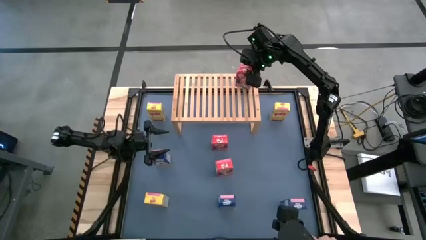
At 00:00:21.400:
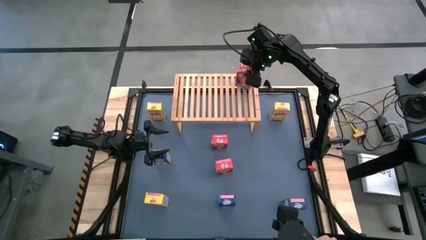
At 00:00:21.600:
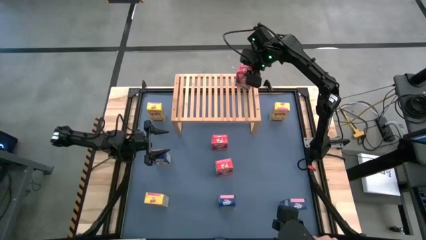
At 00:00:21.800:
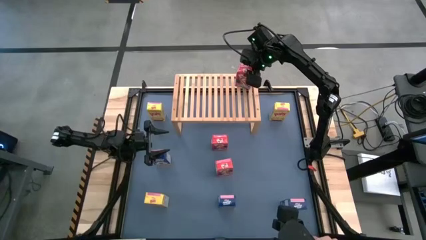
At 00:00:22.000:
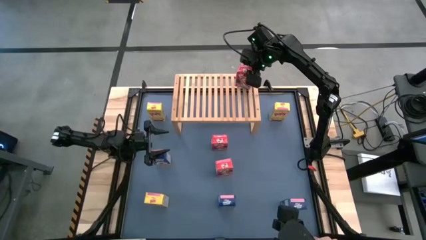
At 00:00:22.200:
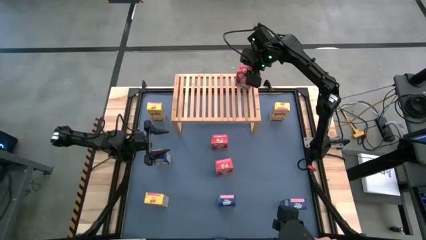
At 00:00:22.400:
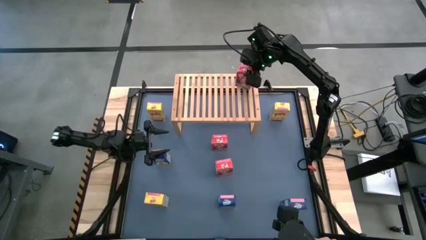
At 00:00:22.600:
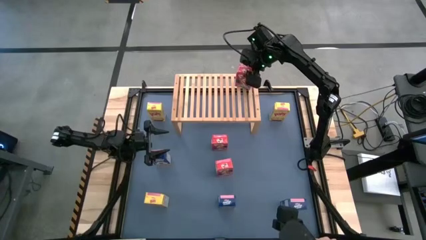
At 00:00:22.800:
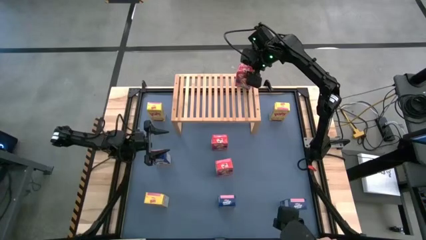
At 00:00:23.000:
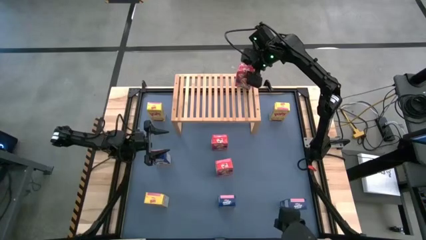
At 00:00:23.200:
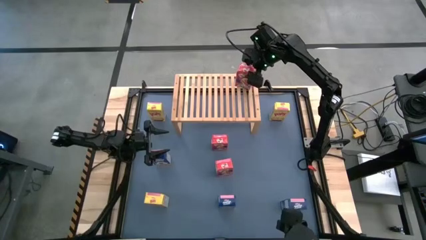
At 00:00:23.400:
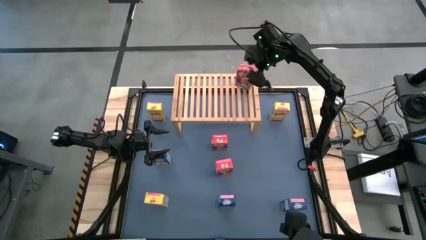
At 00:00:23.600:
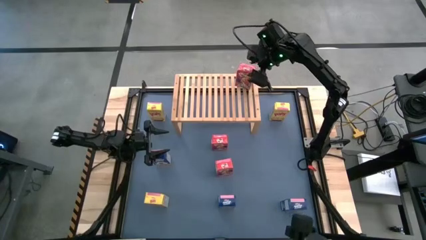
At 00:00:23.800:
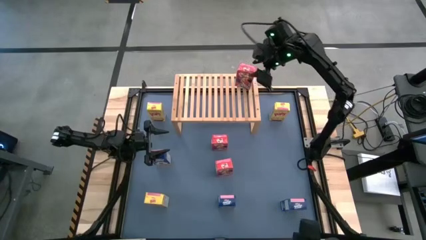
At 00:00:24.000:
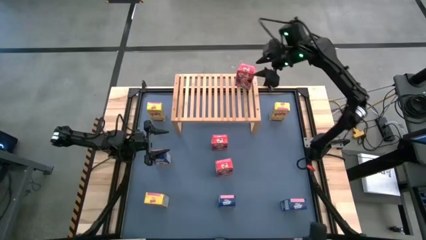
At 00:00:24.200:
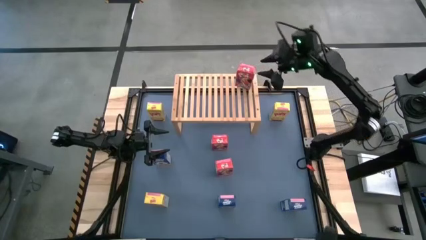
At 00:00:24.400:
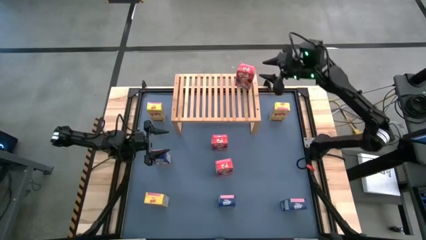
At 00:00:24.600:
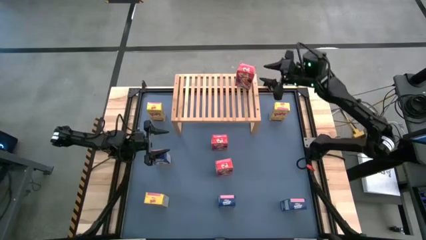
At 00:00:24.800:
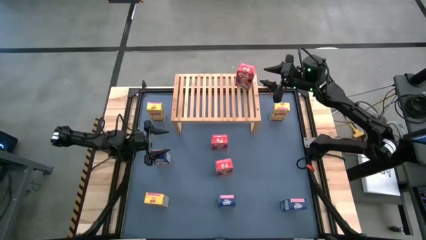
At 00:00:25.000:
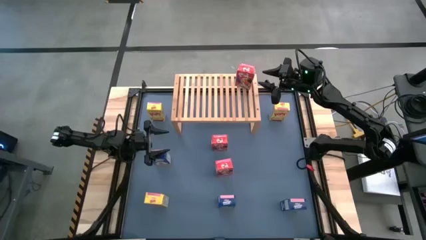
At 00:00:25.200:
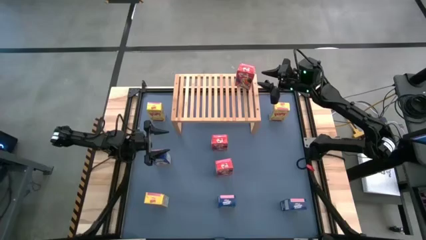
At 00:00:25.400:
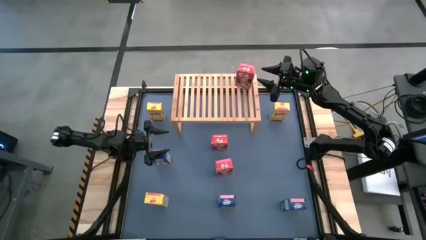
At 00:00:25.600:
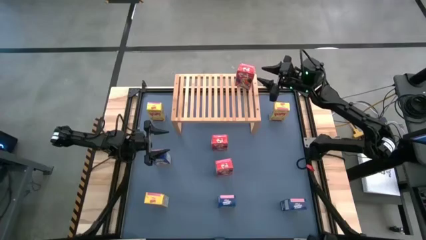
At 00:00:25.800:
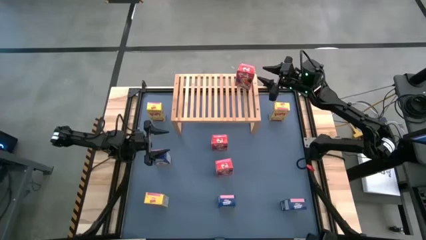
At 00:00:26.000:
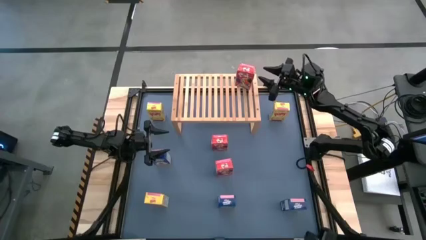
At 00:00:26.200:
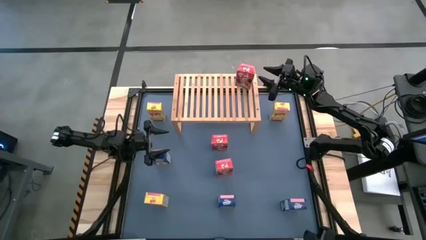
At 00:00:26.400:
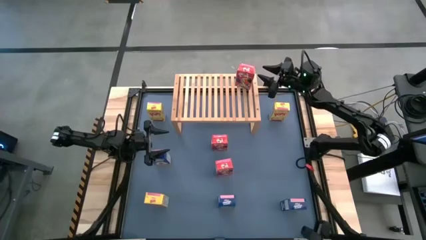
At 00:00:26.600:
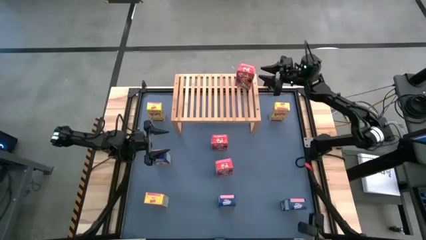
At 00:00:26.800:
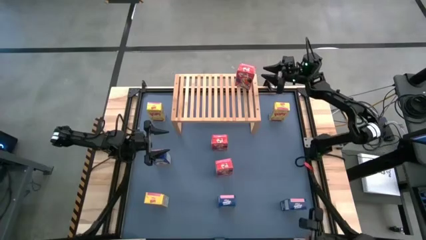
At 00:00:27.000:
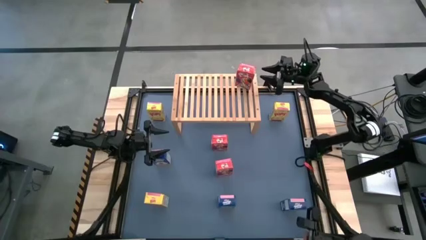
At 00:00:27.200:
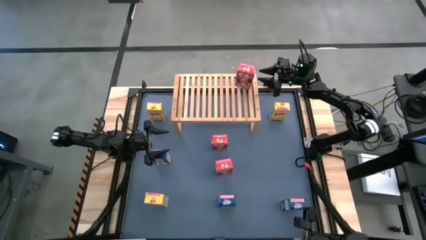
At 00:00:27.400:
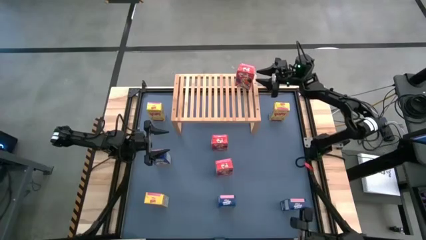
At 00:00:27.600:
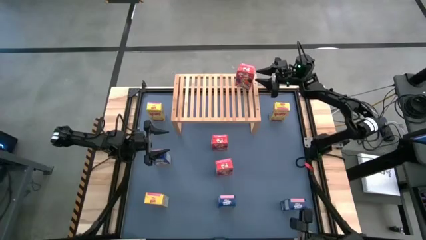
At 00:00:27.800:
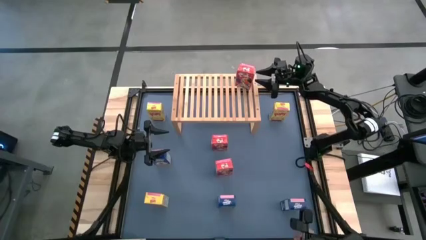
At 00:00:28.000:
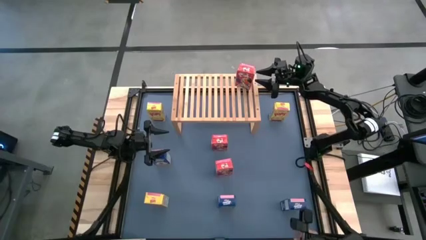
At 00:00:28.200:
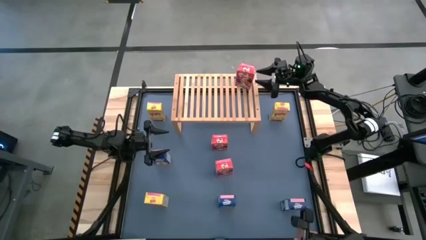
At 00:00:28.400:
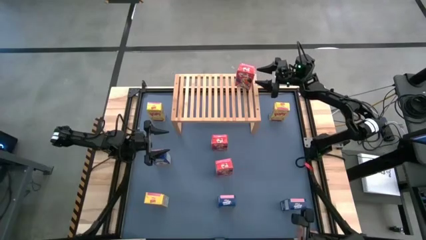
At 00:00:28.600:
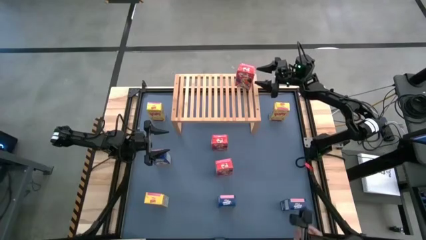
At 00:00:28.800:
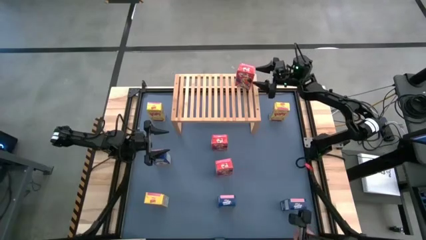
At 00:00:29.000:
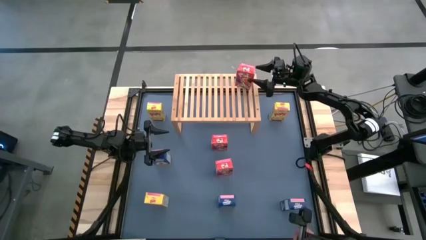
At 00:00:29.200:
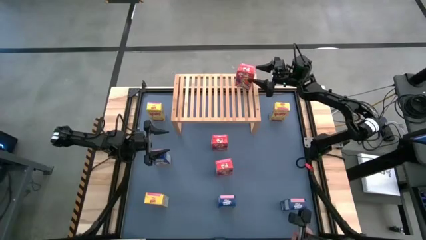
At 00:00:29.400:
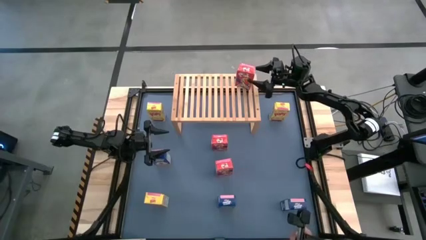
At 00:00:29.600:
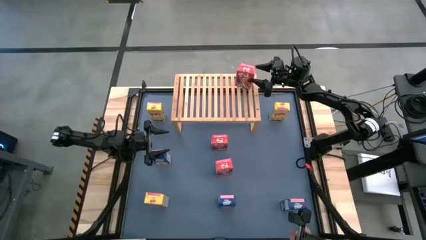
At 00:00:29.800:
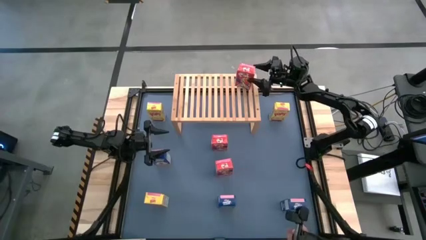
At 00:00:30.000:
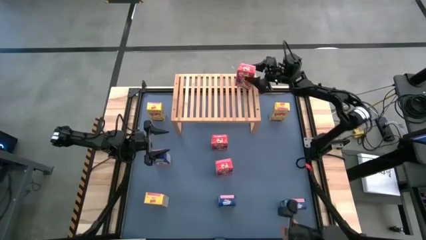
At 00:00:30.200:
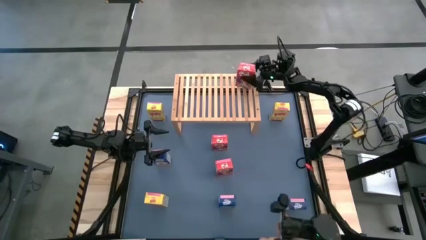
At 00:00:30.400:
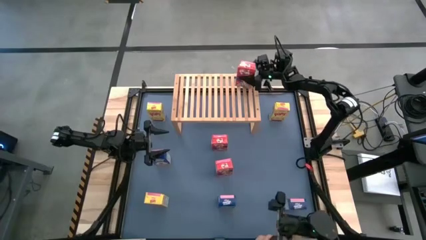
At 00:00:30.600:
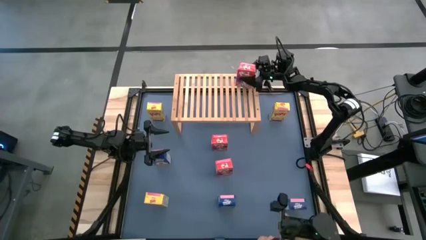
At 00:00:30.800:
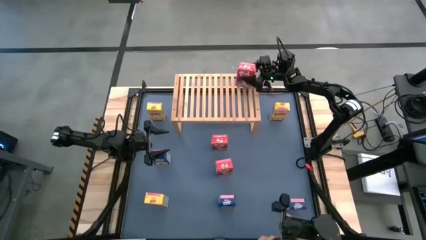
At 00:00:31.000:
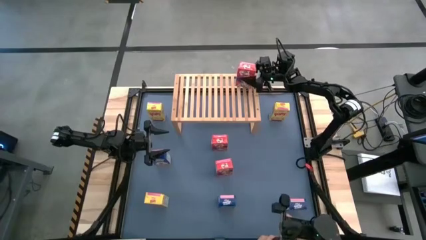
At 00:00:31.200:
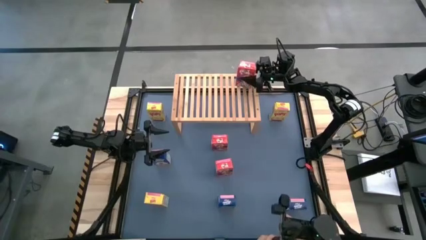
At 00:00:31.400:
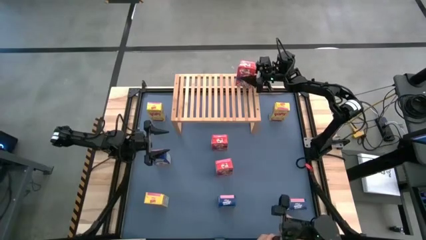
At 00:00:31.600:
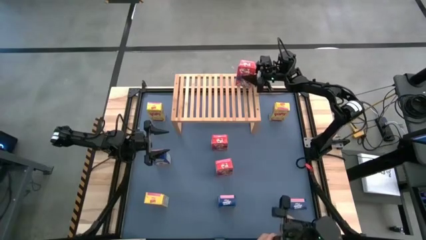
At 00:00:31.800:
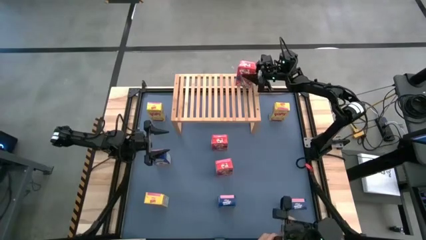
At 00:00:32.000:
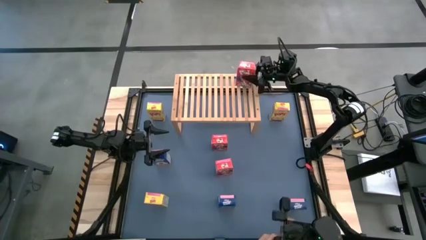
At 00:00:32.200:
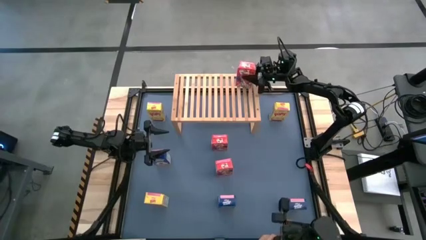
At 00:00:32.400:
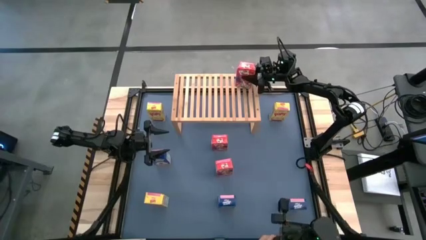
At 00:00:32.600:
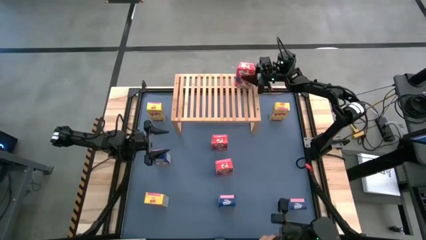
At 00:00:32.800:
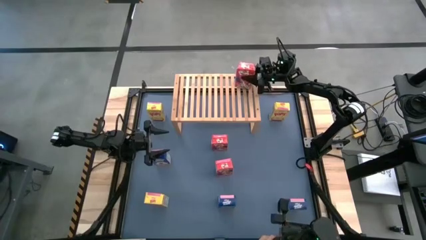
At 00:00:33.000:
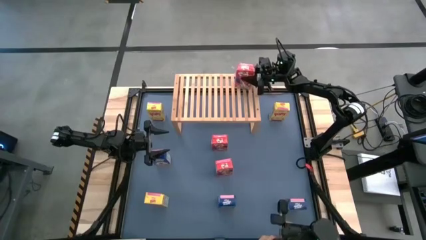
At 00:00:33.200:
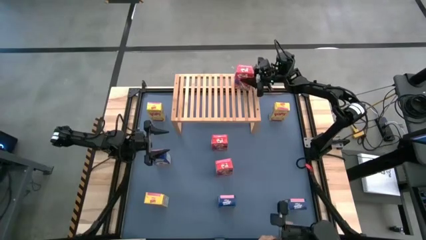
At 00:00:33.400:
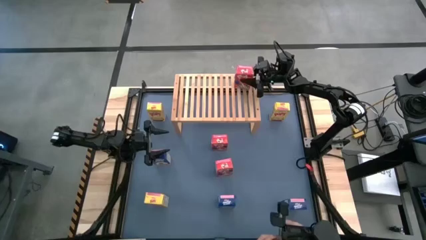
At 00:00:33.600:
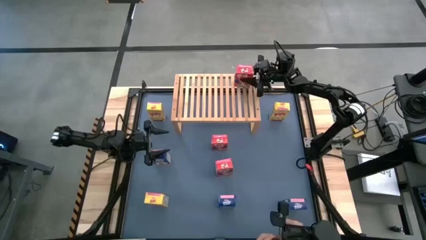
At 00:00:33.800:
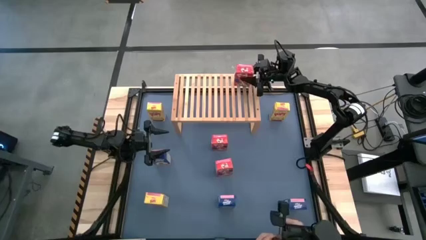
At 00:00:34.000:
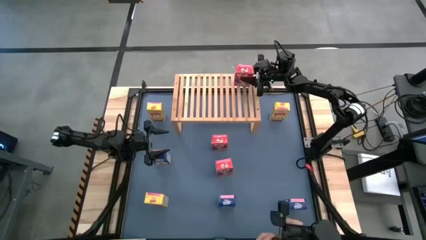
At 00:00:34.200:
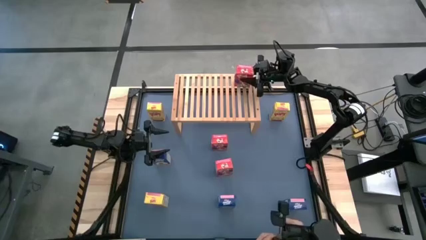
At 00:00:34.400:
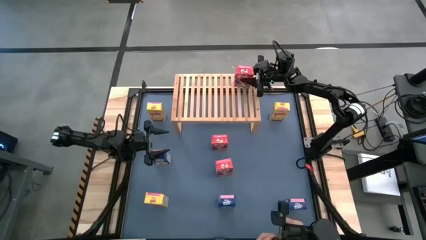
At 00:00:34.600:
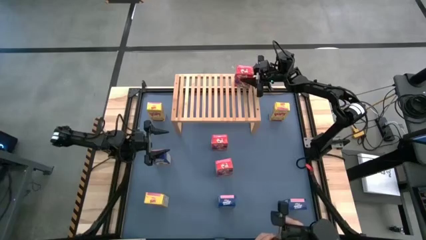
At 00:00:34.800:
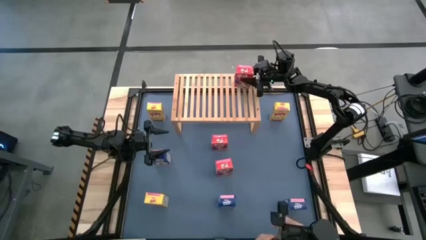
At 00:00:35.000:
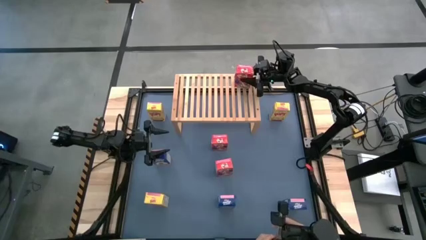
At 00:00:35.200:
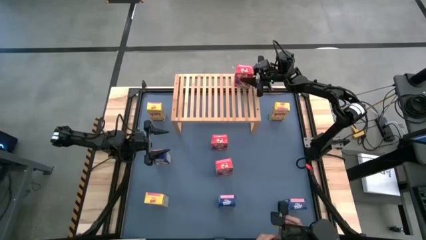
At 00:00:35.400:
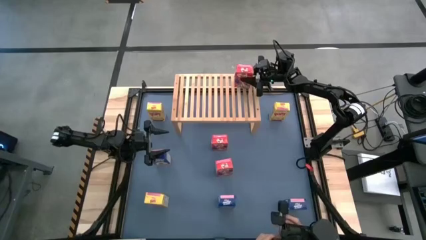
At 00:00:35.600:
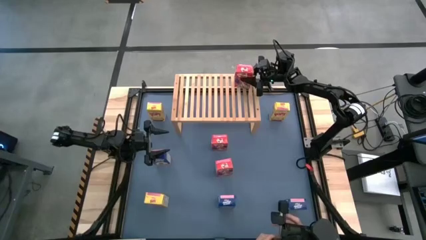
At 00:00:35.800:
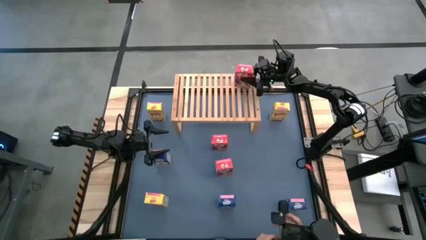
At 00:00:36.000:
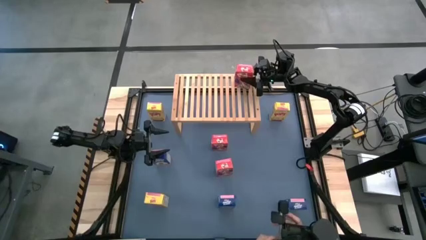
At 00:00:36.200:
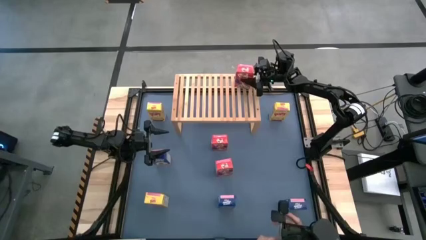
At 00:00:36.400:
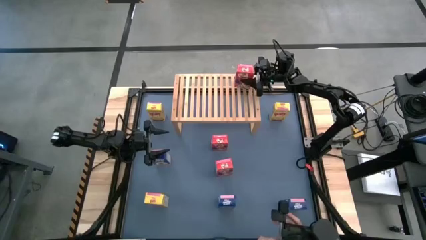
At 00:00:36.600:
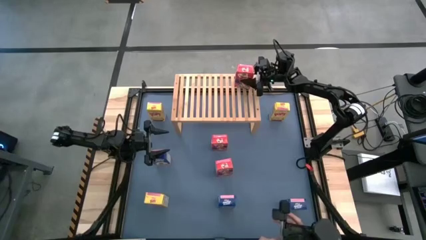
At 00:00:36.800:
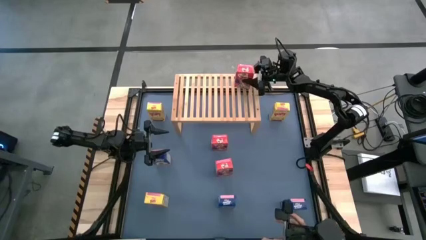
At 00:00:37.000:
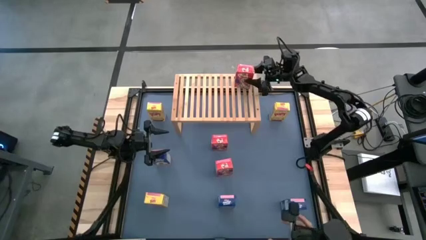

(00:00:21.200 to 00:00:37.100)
Task: Stack cereal on shelf
Put the bottom right red cereal box on the shelf
